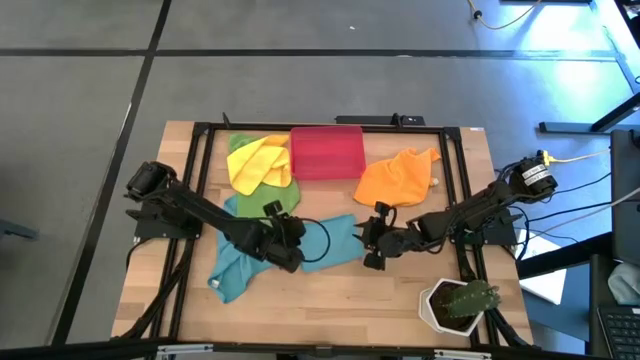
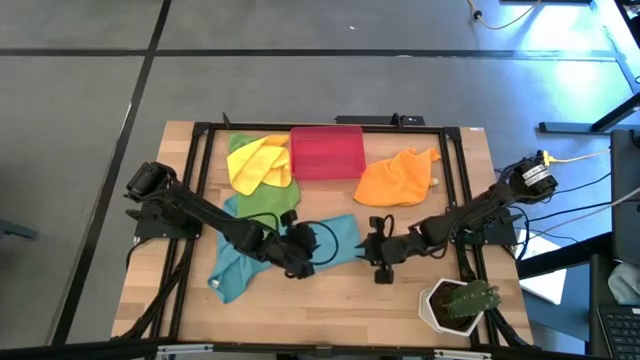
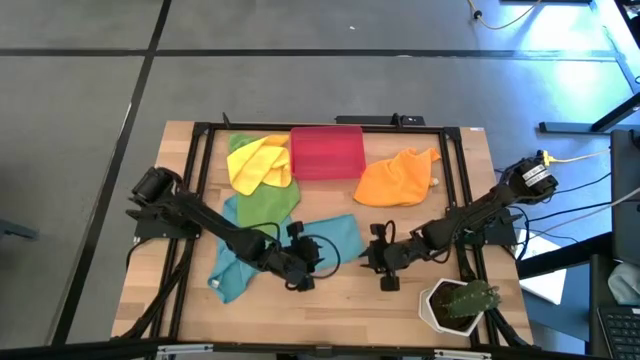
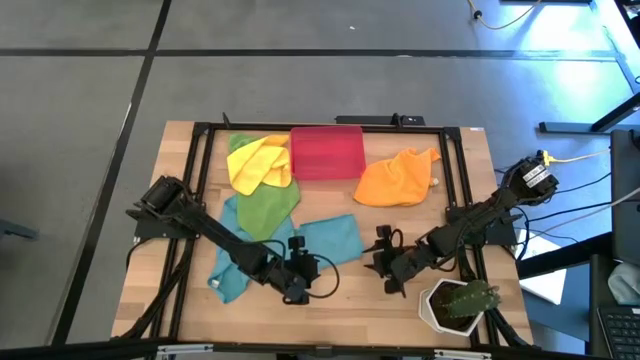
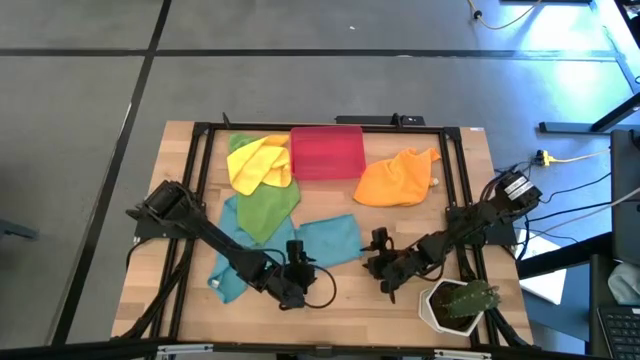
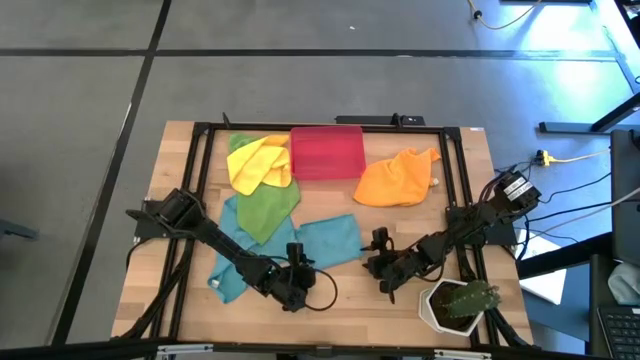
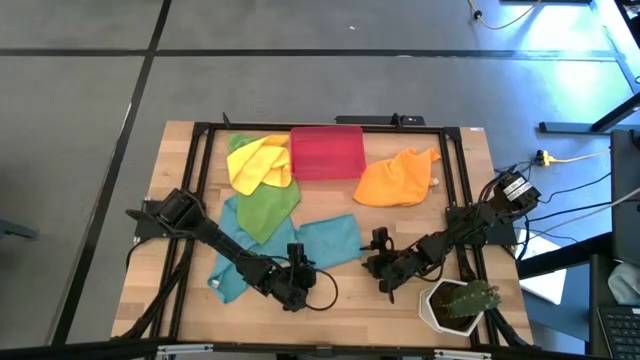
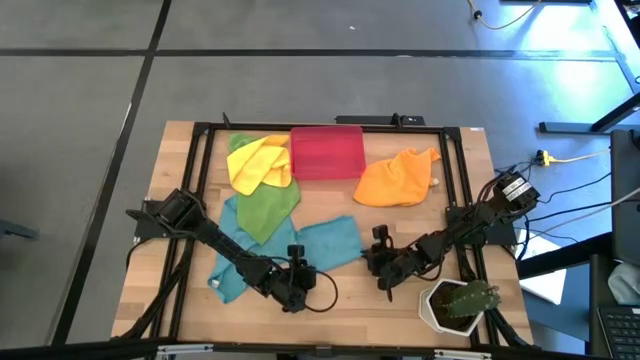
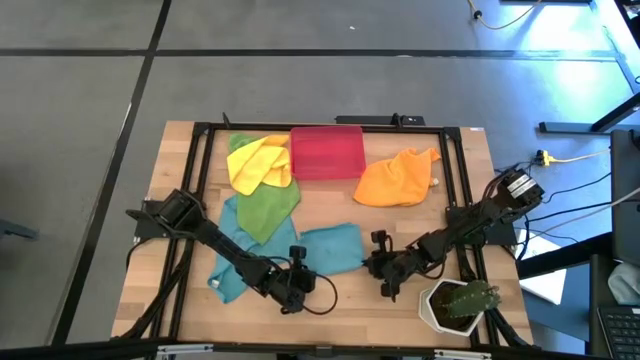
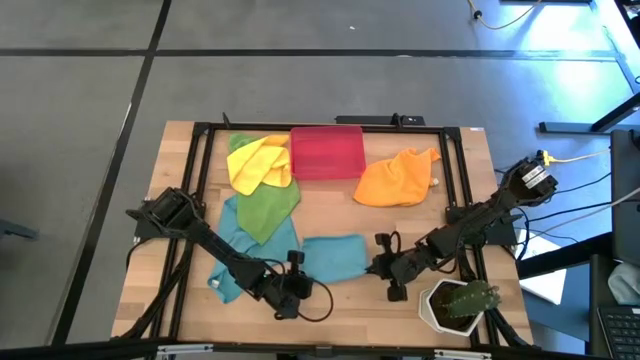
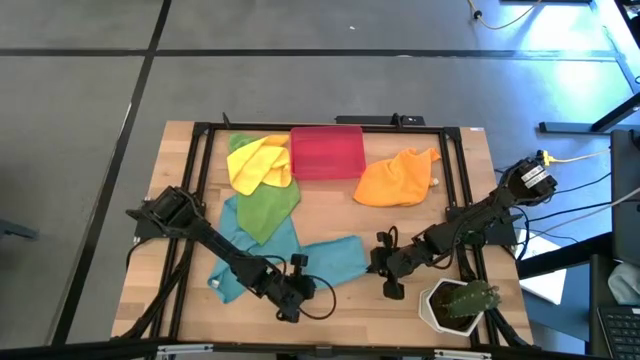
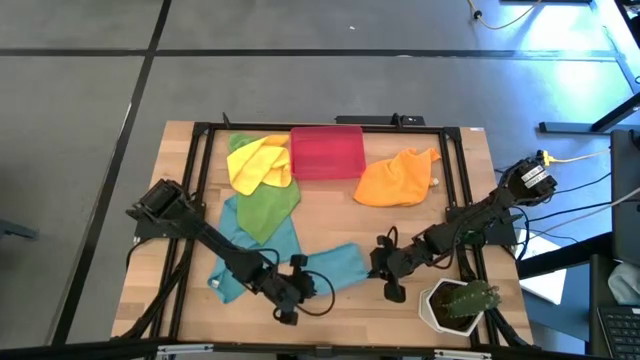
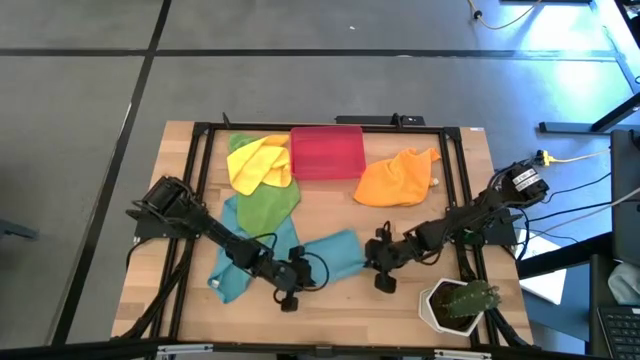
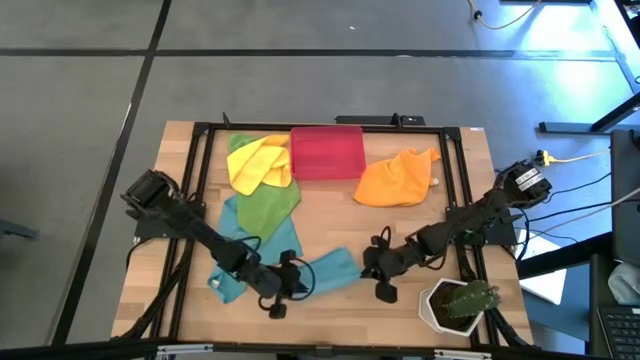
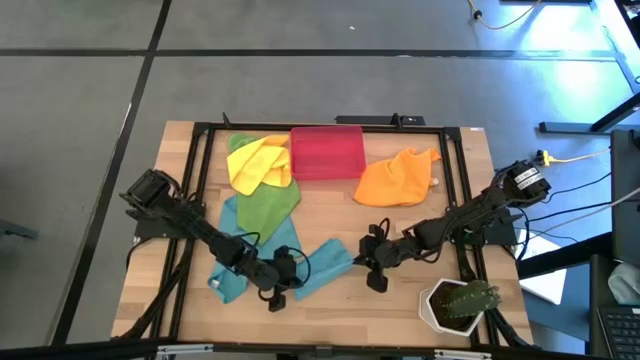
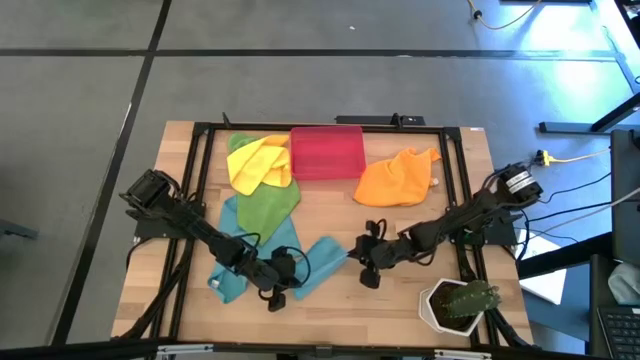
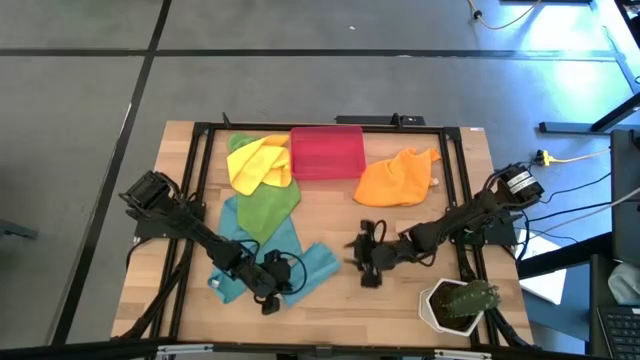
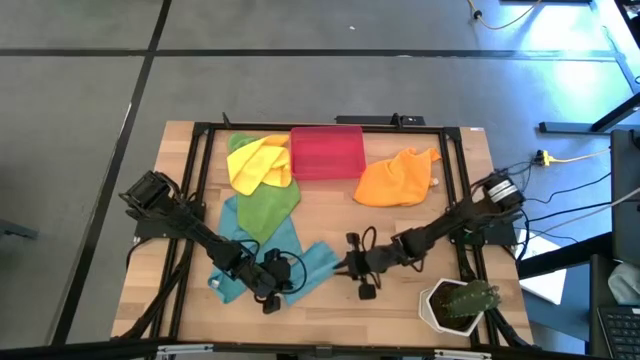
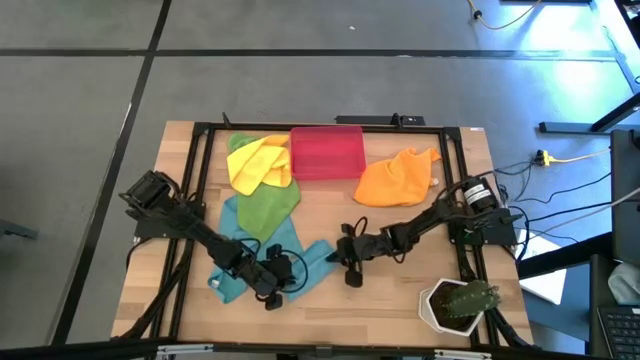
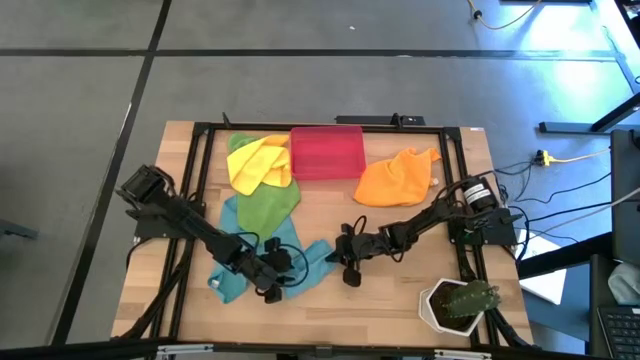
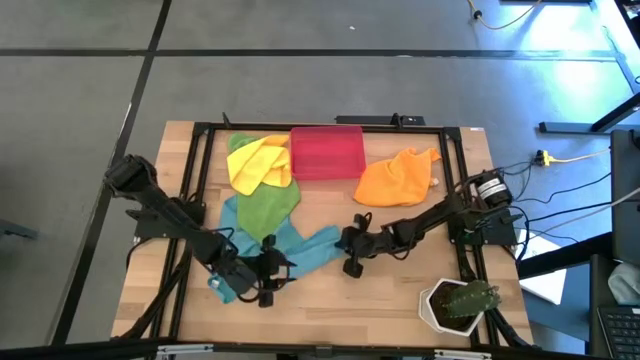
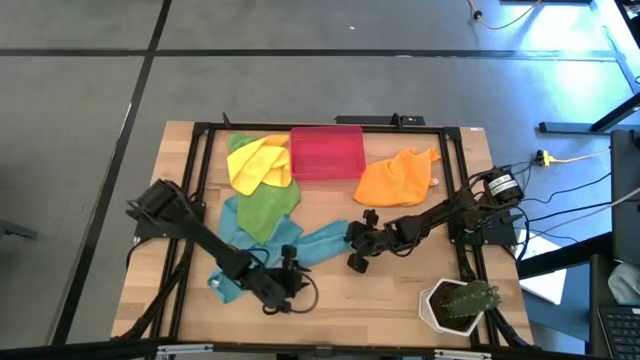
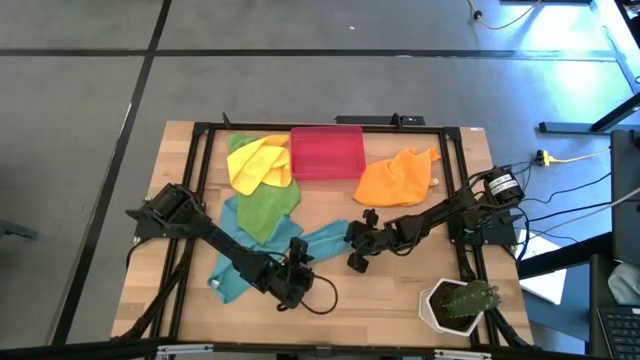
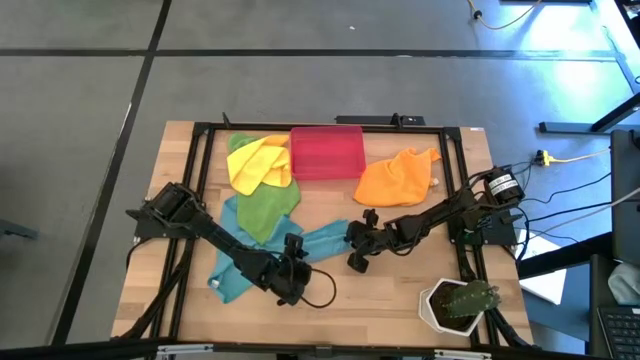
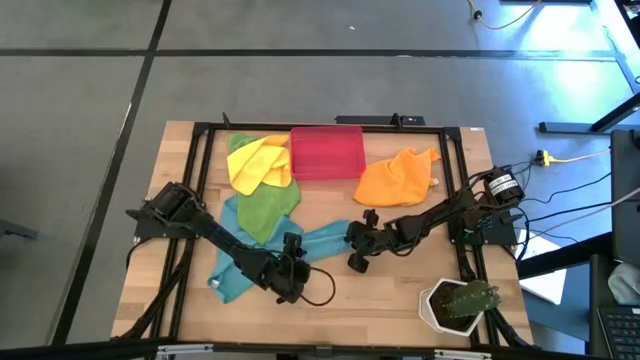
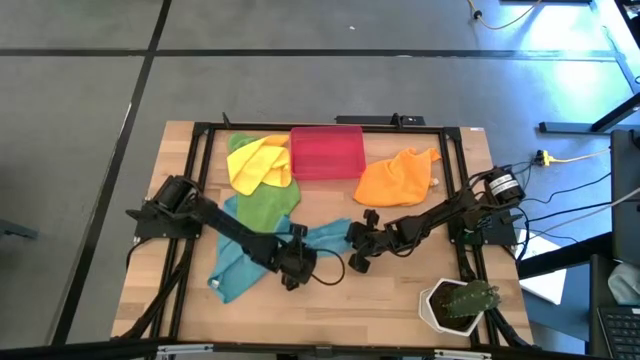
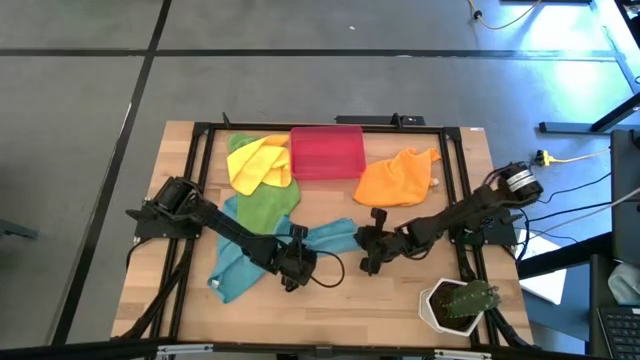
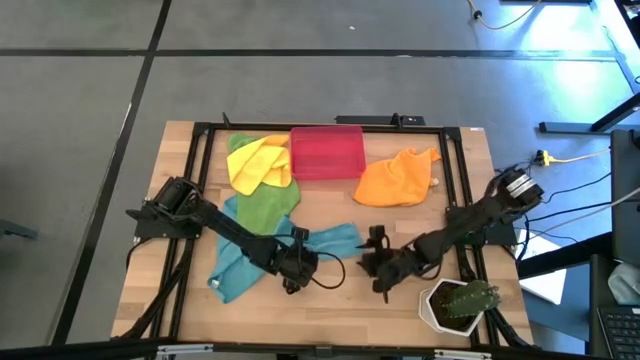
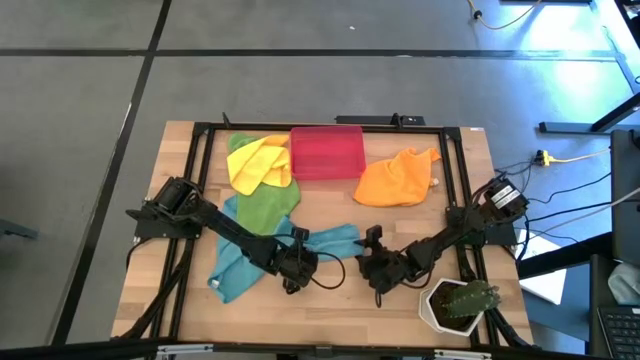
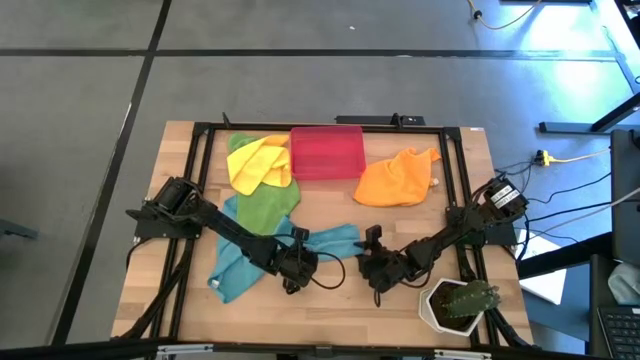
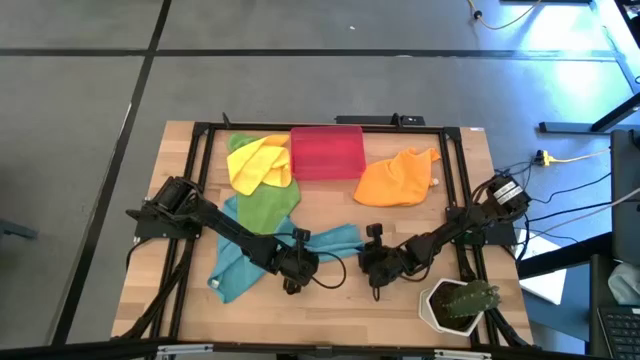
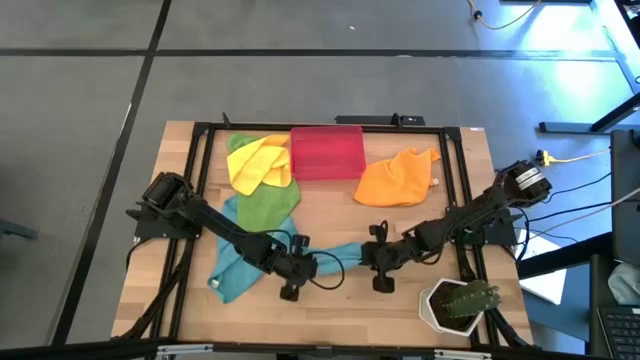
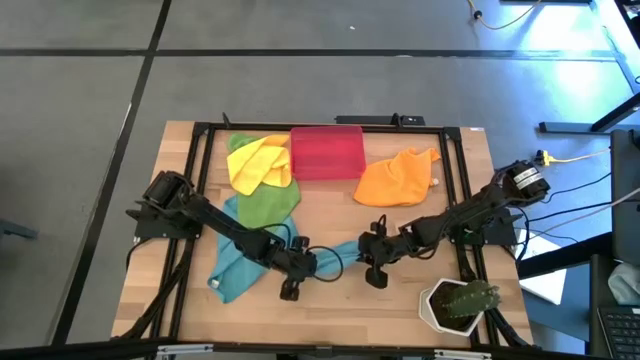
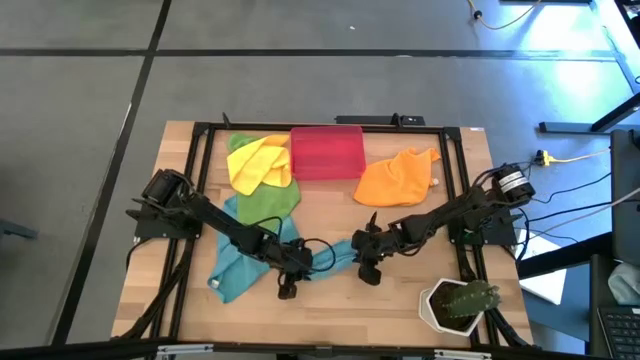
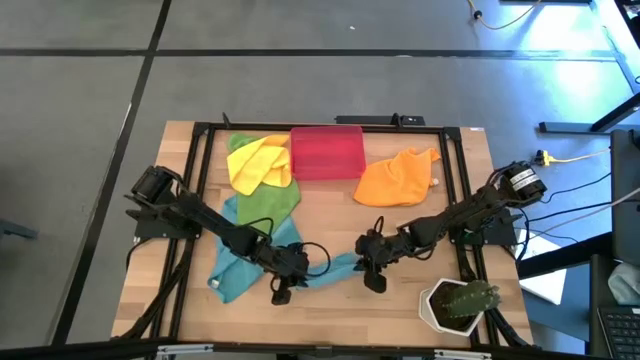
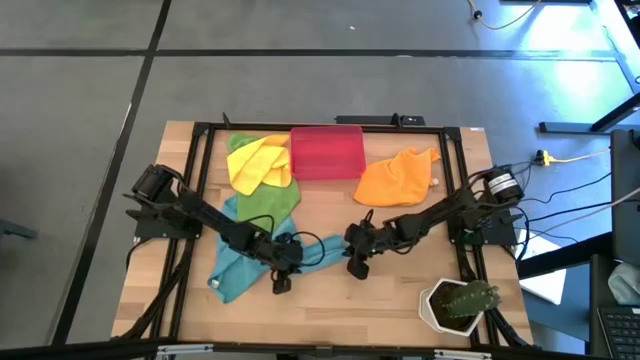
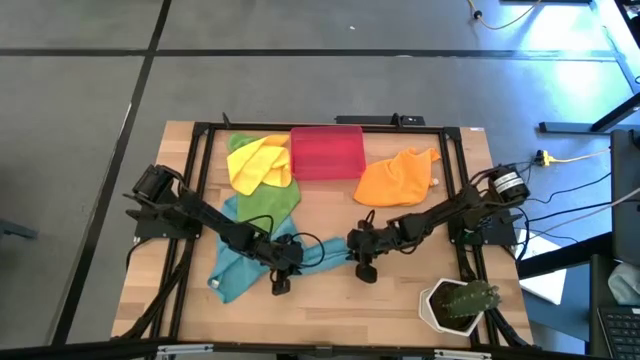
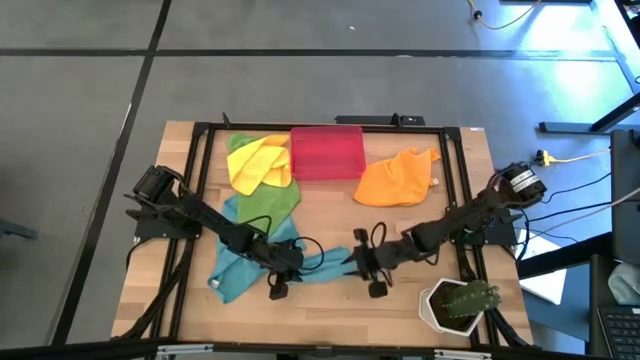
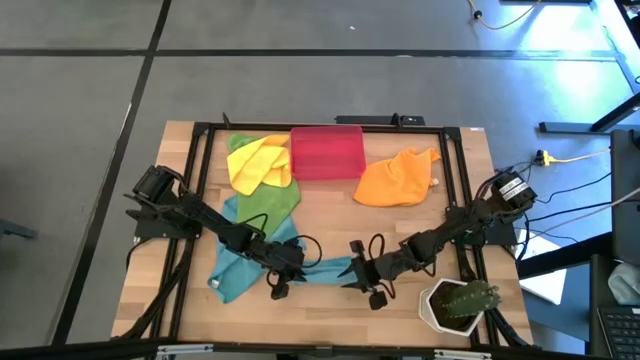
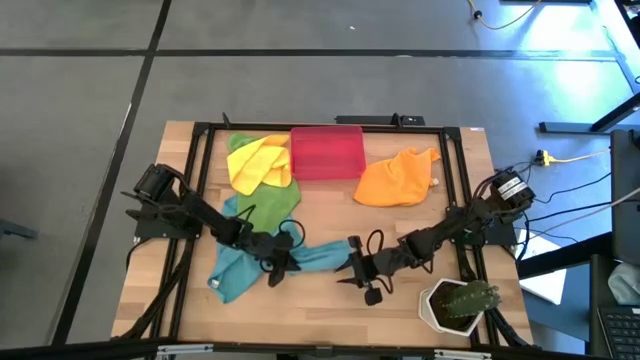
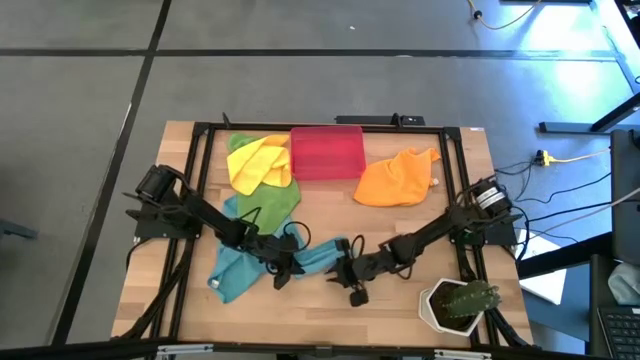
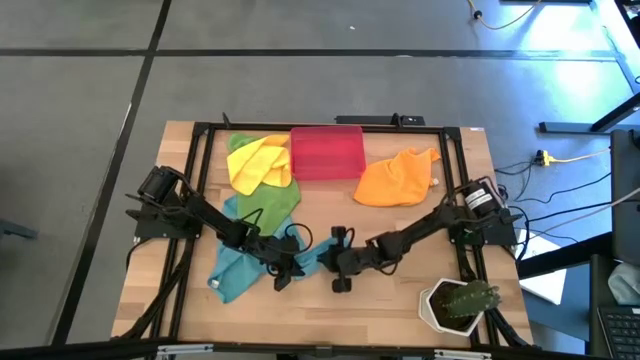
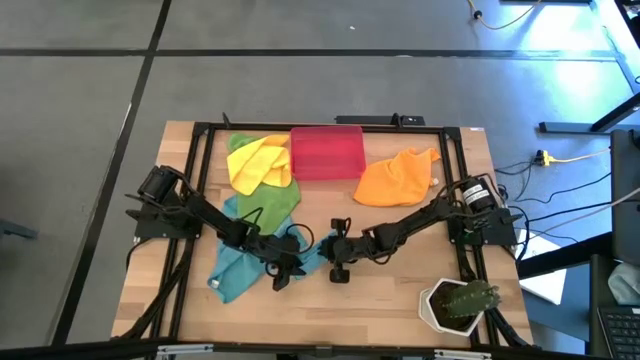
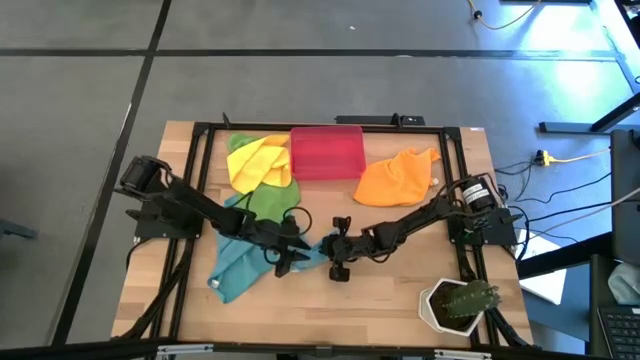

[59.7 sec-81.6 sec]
Task: Roll microfiber towels into tight, uniform cylinder then place into a basket
Roll the right blue microfiber towel
